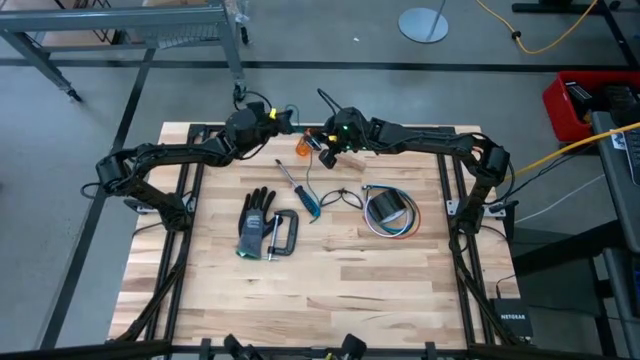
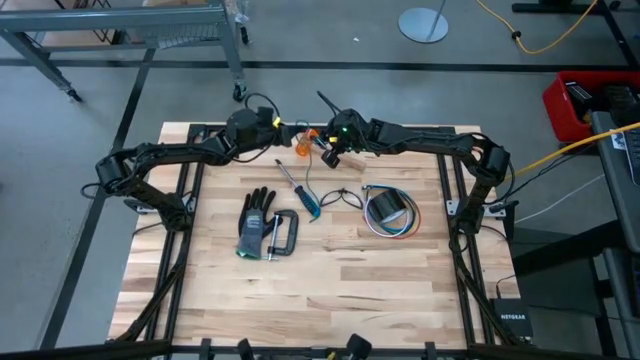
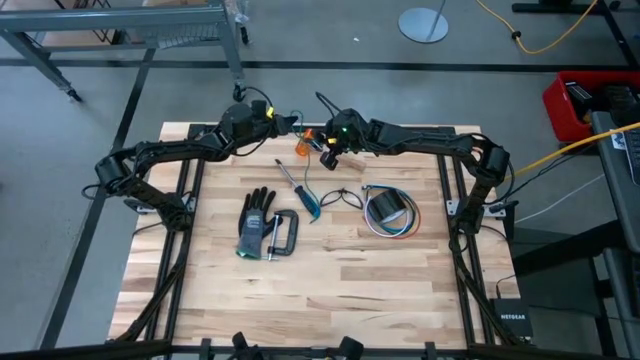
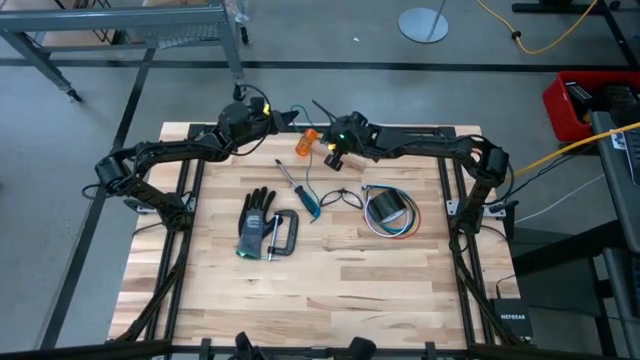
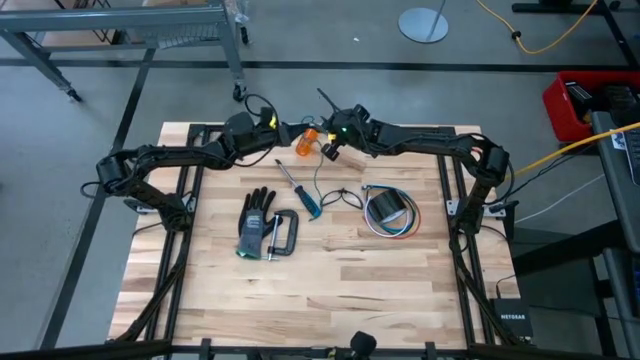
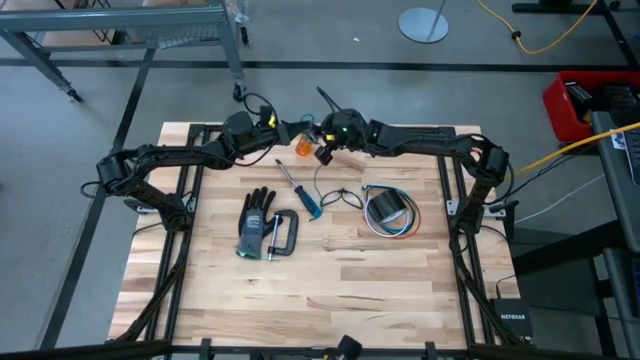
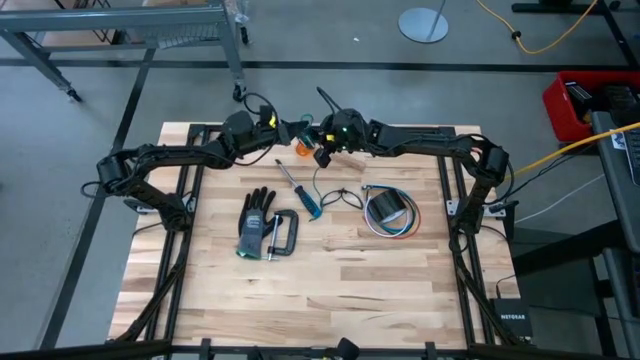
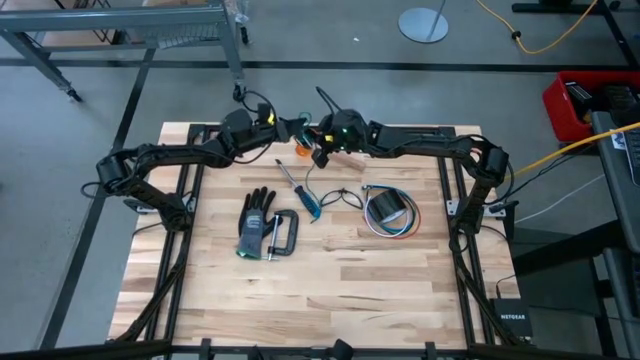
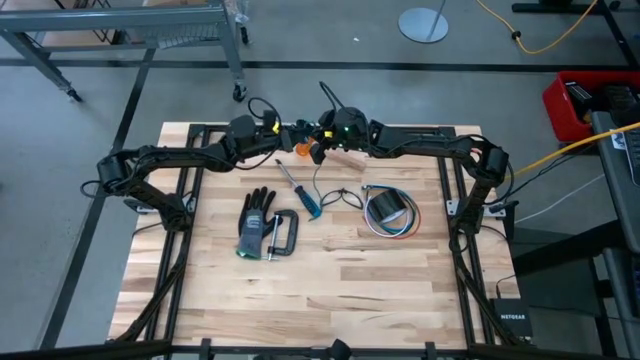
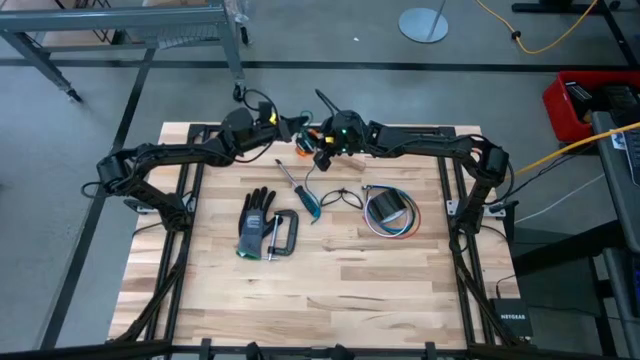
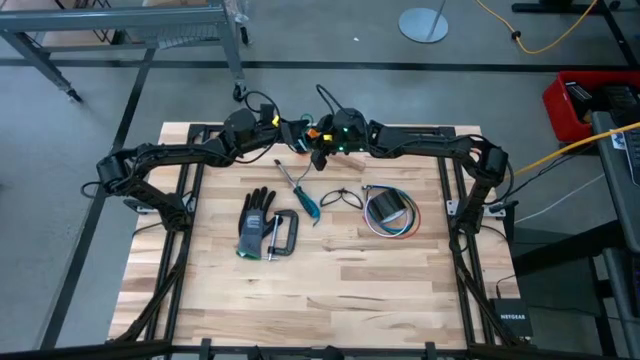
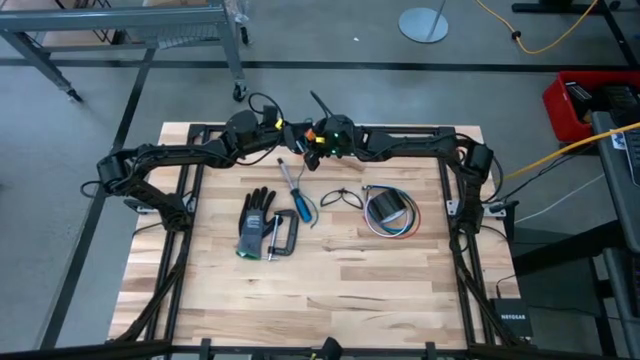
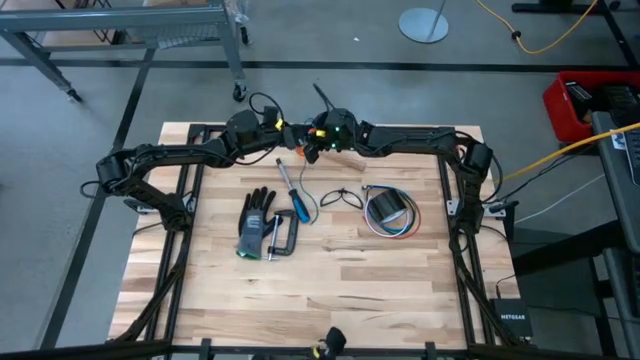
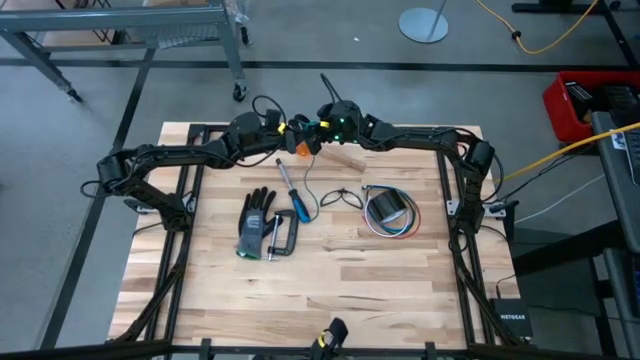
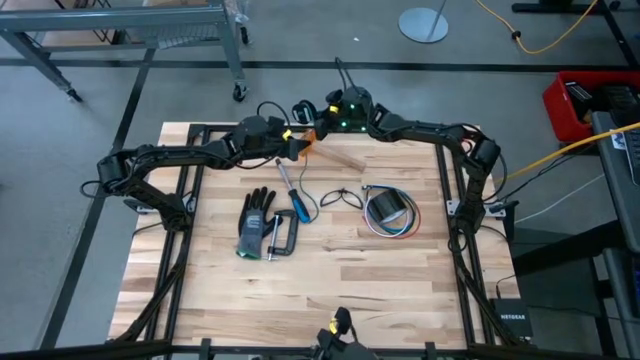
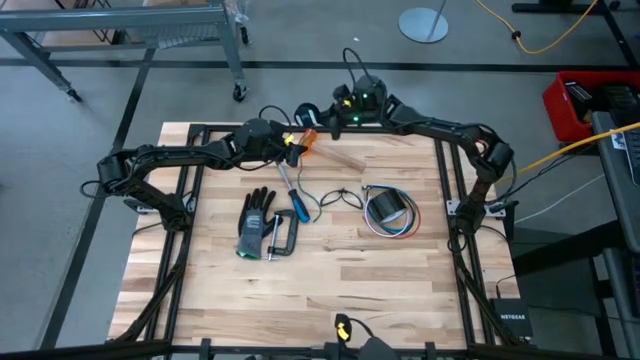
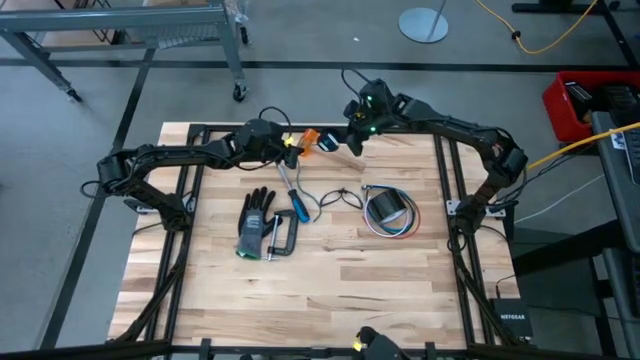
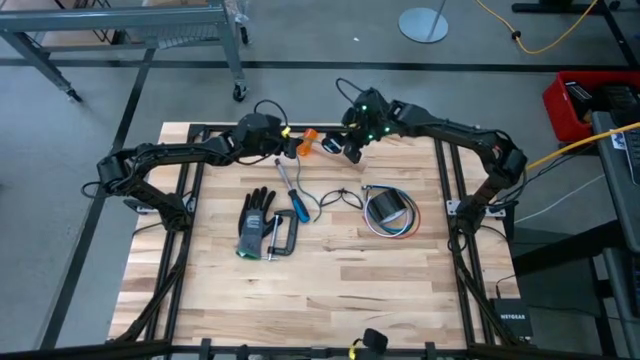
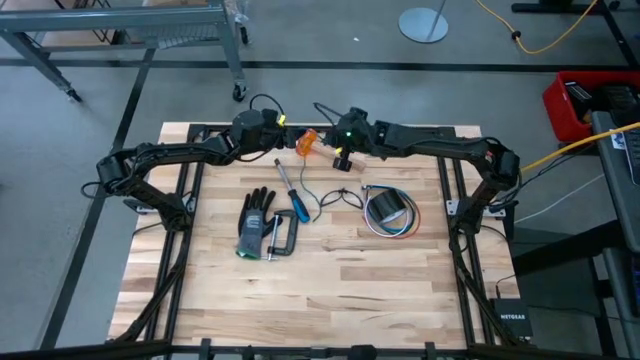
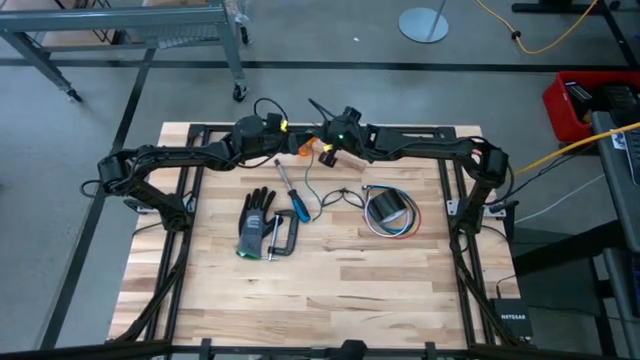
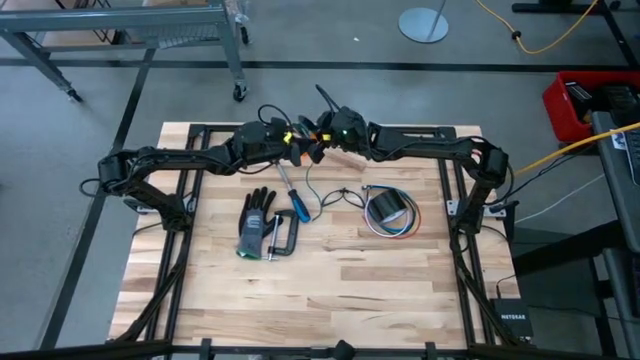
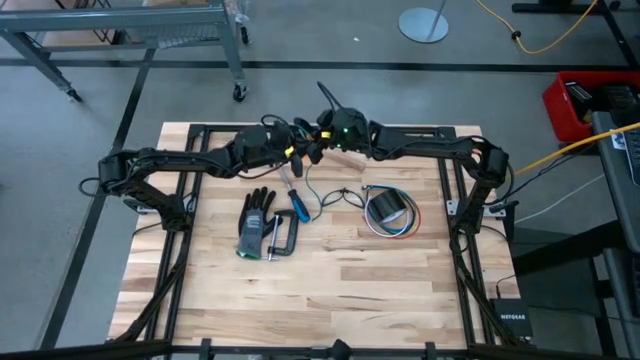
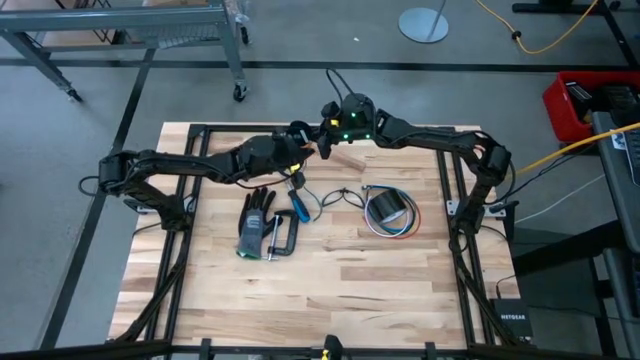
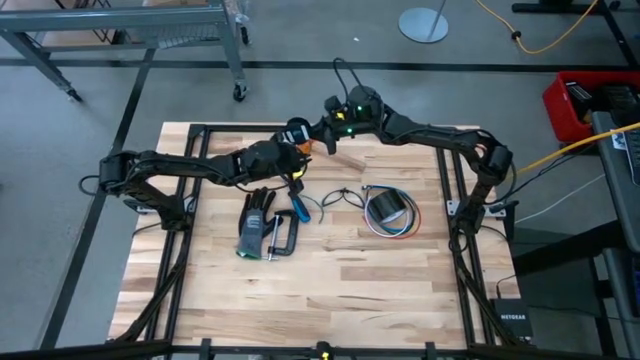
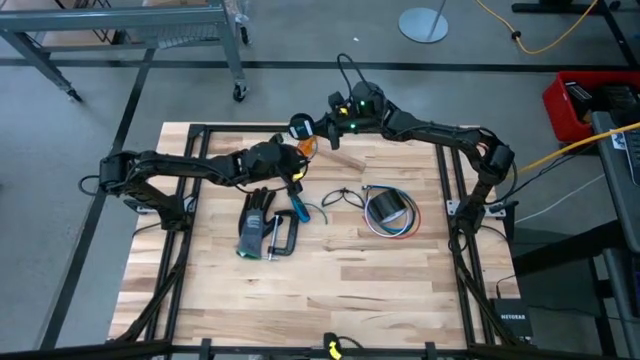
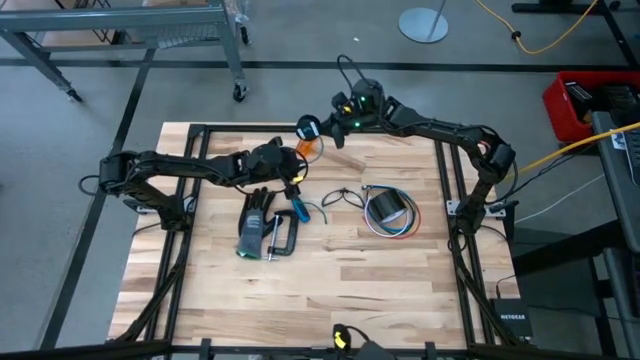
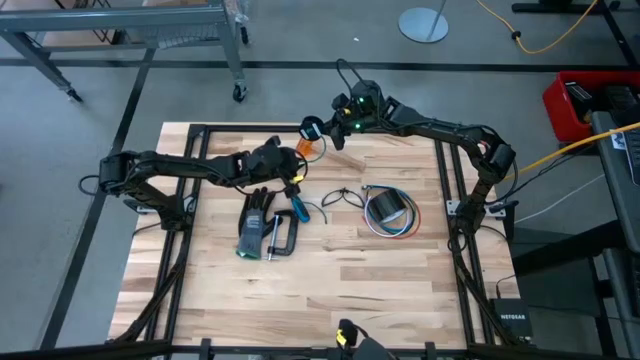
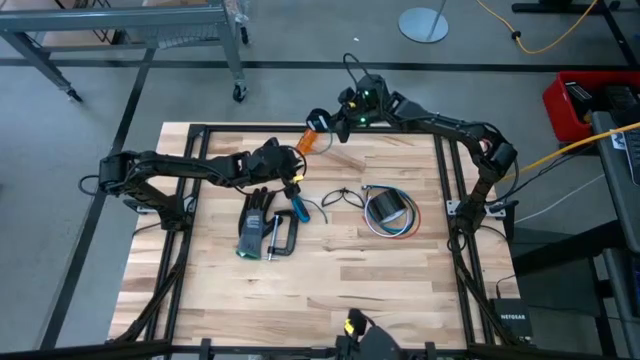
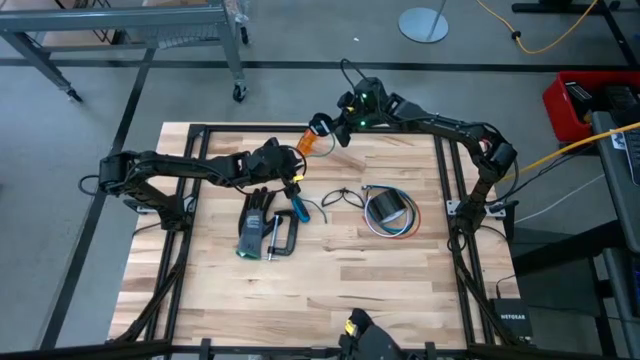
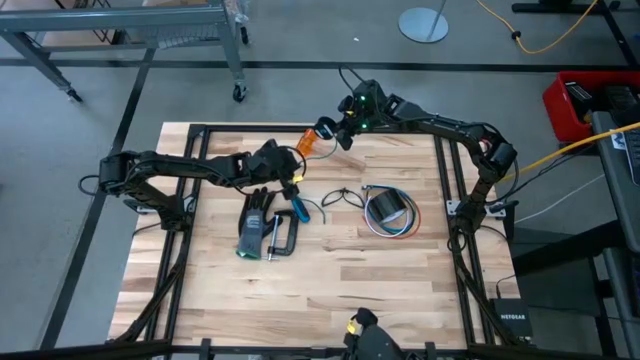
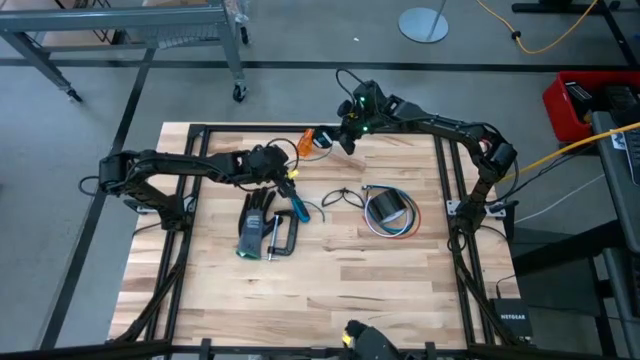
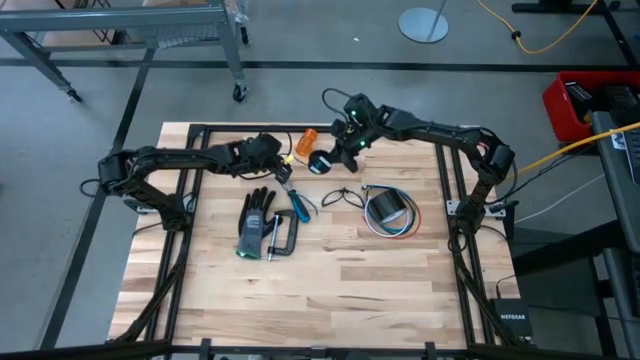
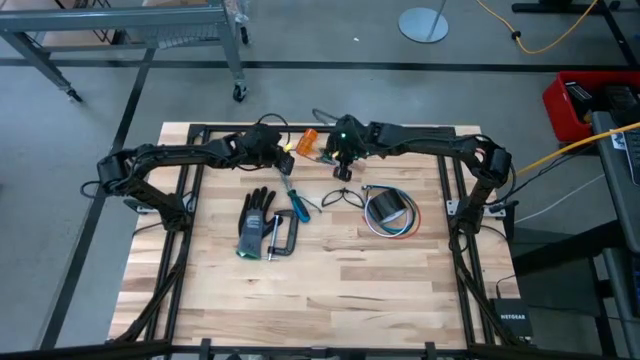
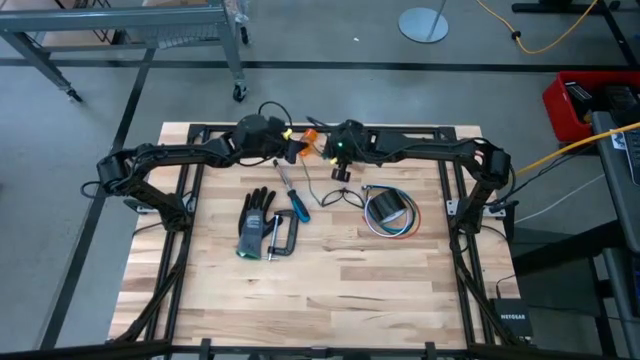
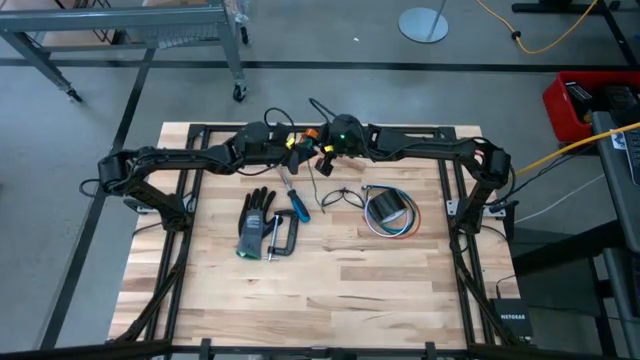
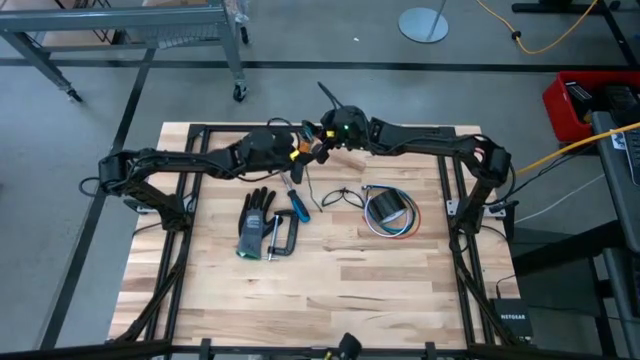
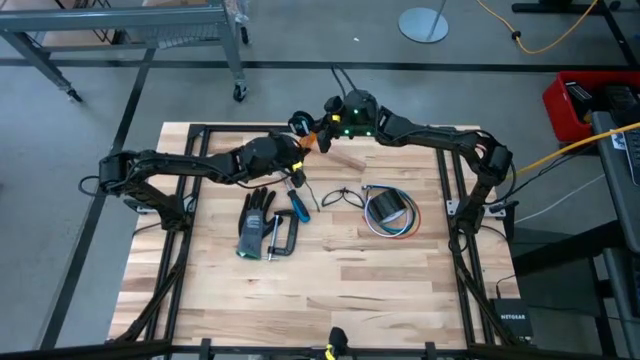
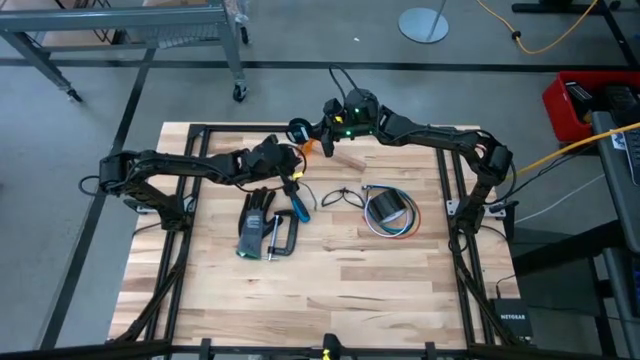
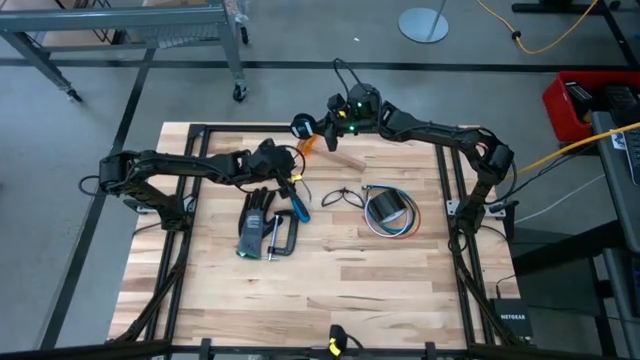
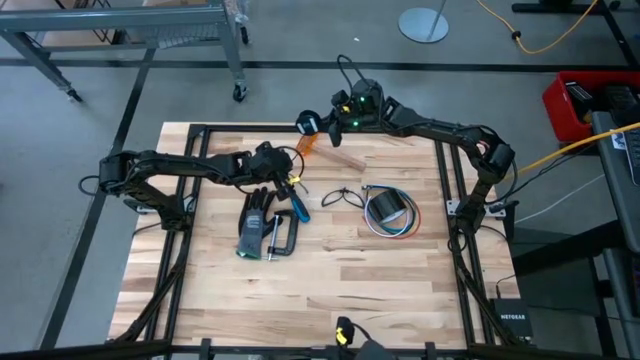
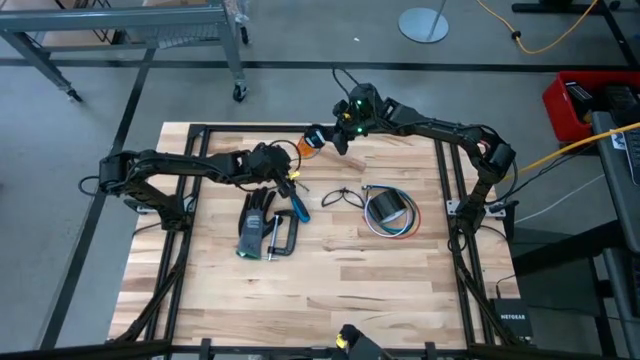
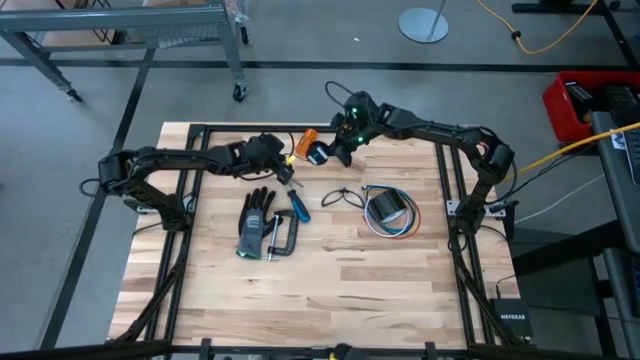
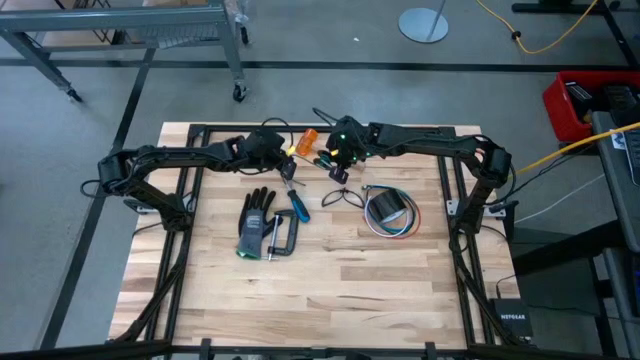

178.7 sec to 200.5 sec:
Task: Coil cords
Coil the green wire onto the spool
